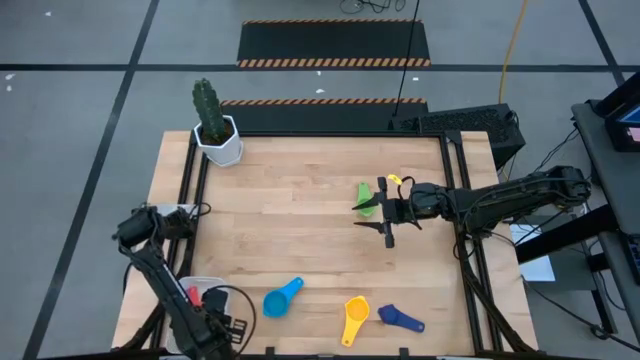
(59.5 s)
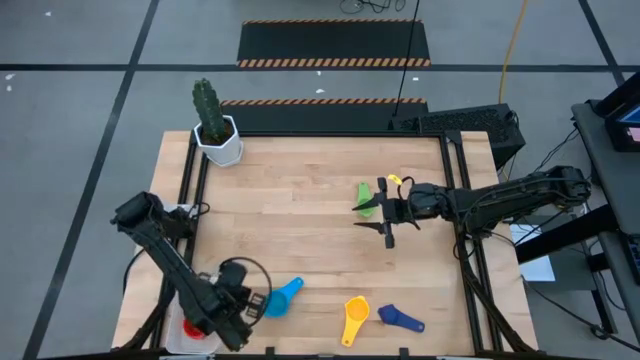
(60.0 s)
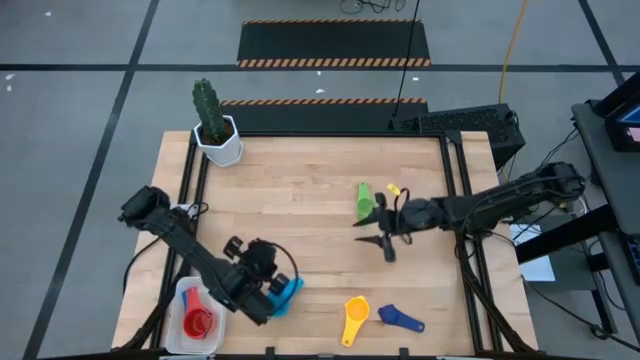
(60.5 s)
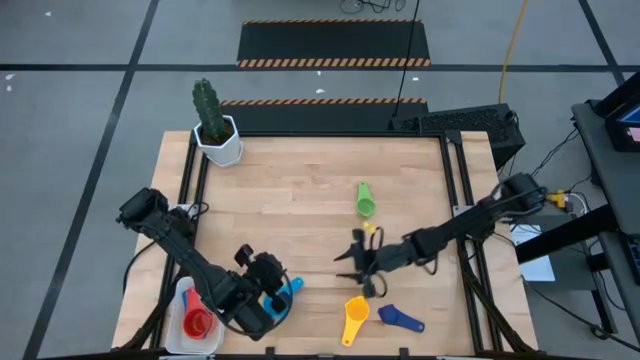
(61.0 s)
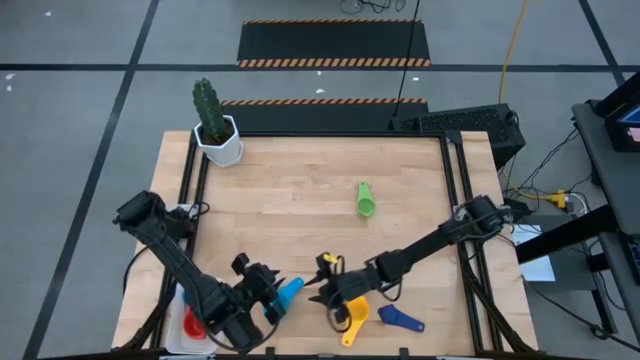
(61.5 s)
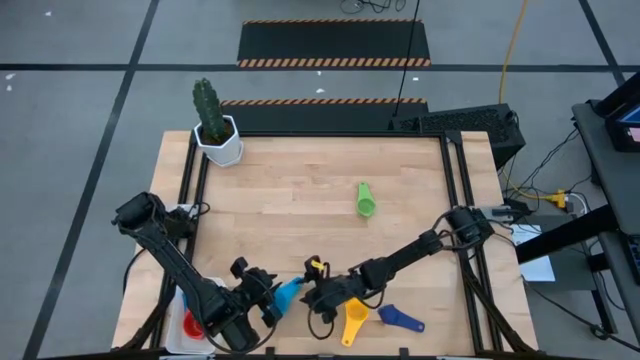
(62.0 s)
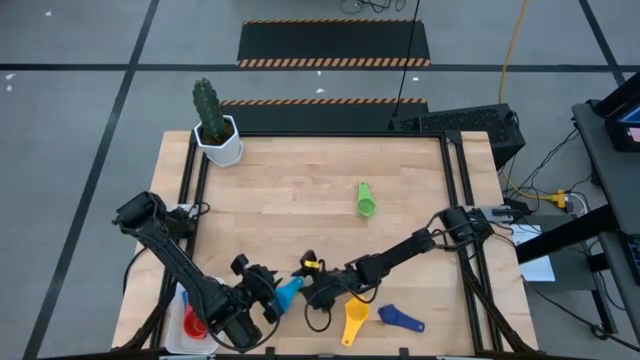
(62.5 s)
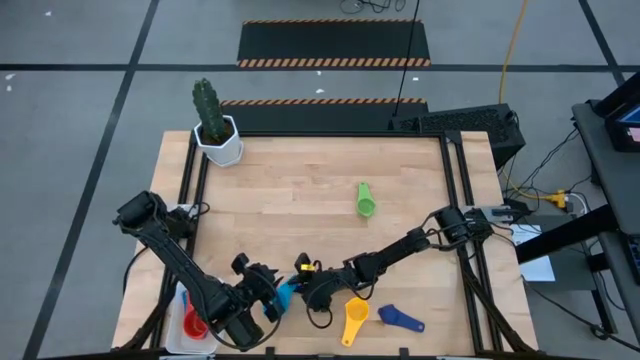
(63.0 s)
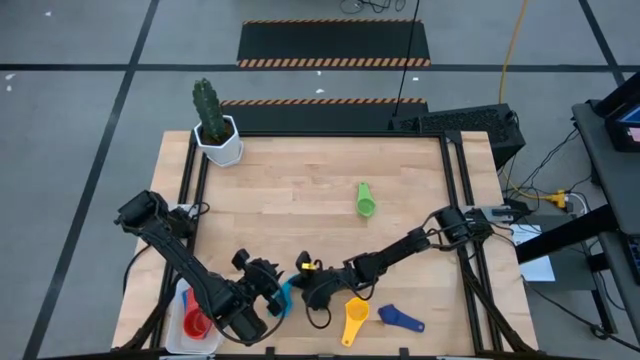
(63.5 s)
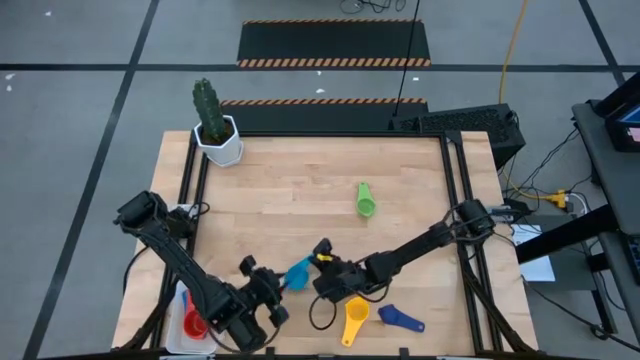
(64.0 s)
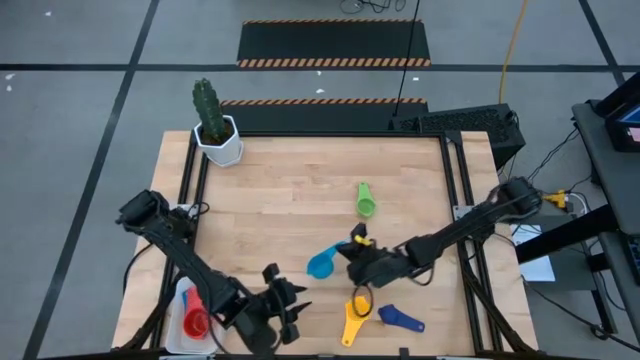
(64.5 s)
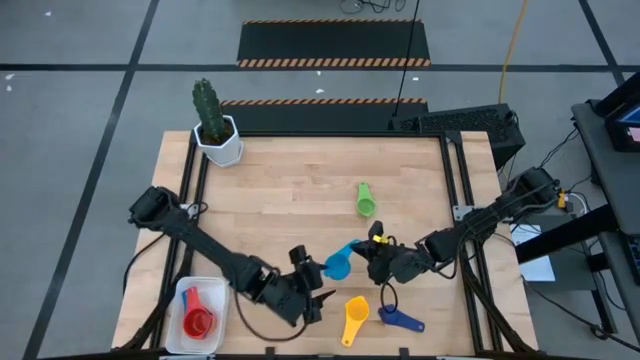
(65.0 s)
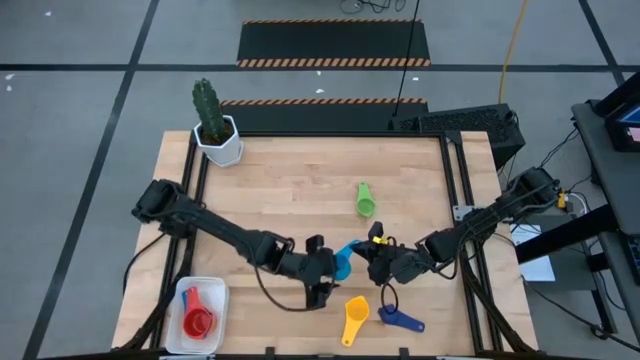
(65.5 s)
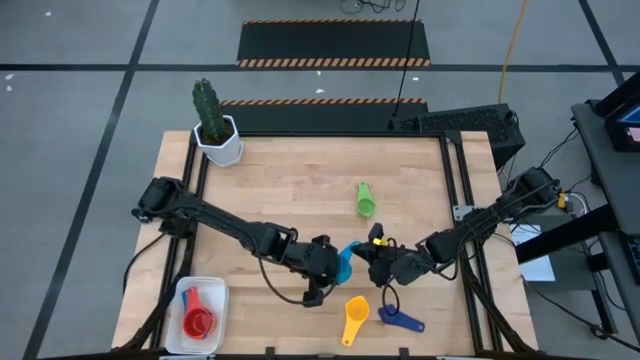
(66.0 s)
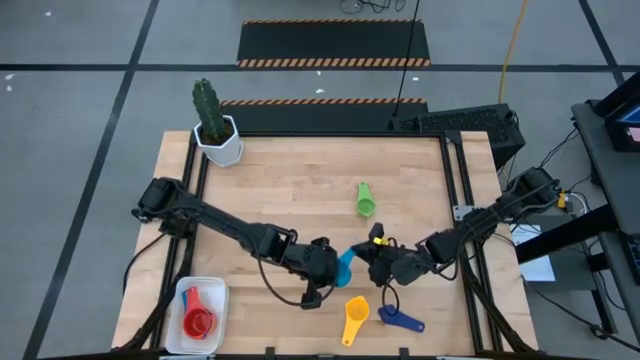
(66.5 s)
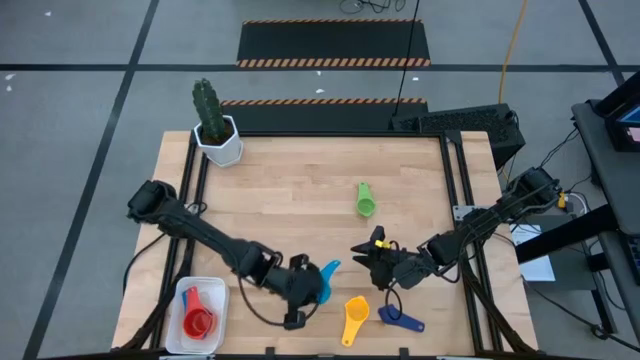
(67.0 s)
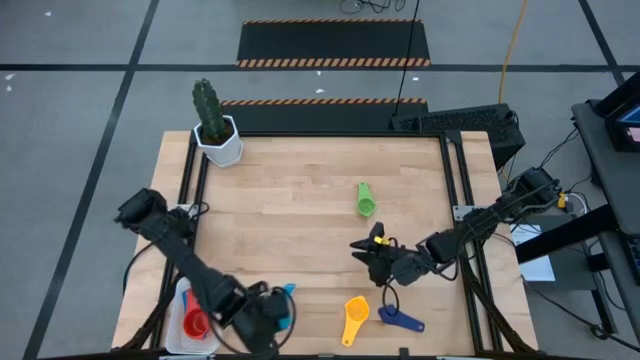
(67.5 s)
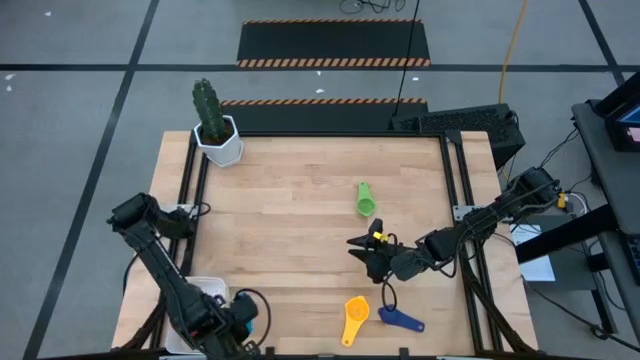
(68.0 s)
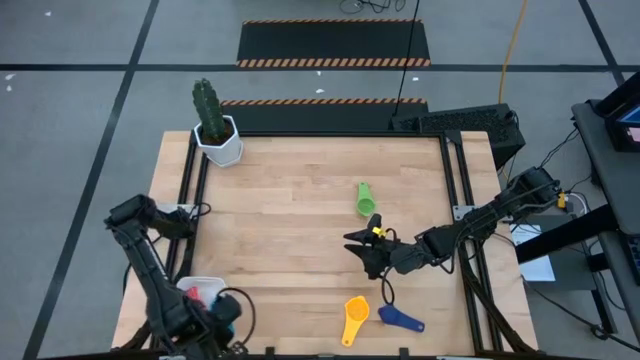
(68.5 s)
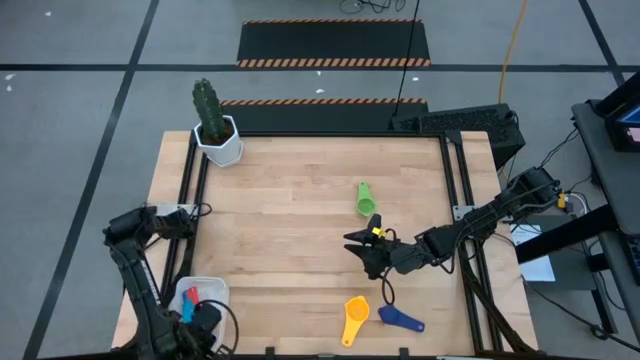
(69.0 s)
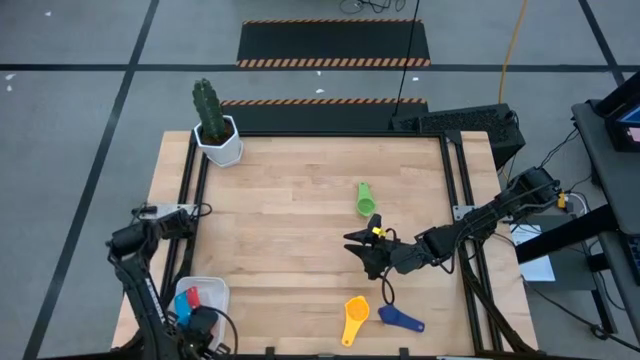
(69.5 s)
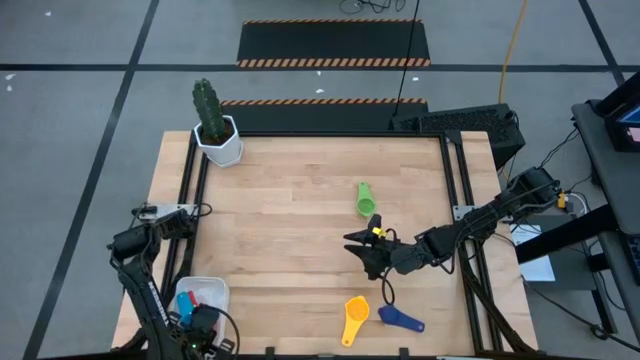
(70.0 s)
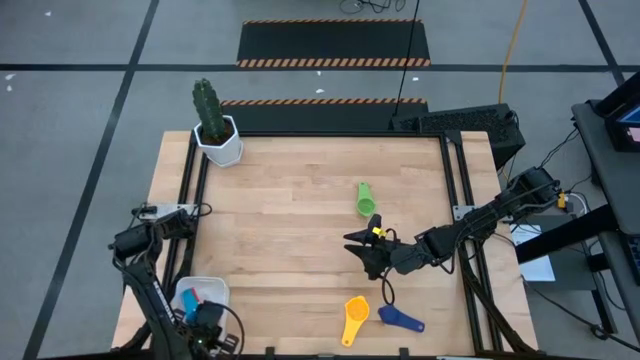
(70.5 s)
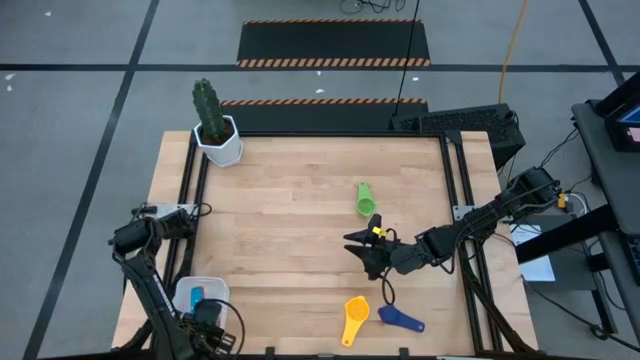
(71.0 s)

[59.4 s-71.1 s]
Task: Nest measuring cups in basket
Stack the light blue measuring cup on top of the red measuring cup into the white bin

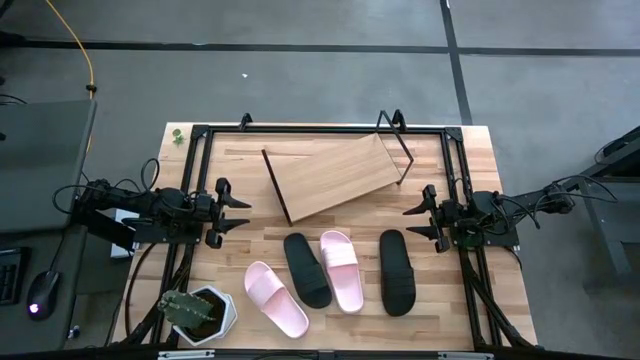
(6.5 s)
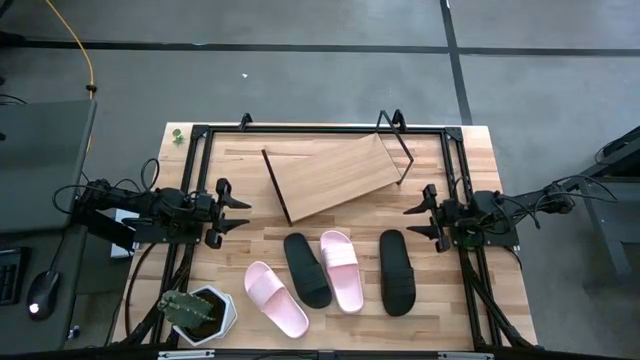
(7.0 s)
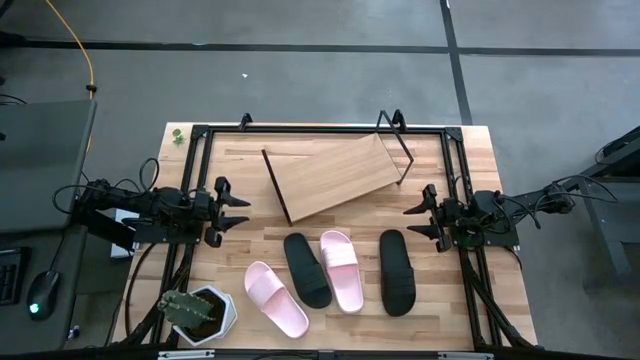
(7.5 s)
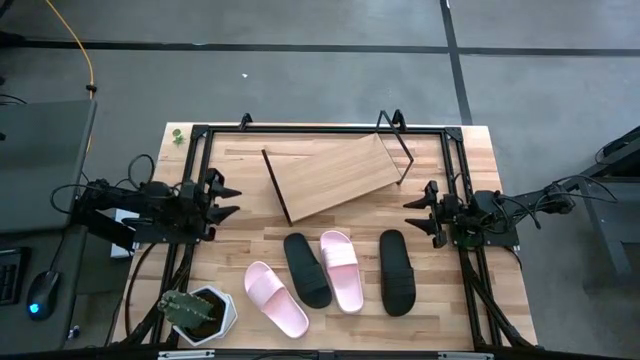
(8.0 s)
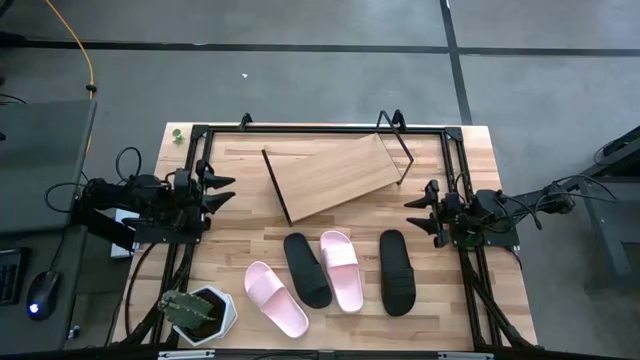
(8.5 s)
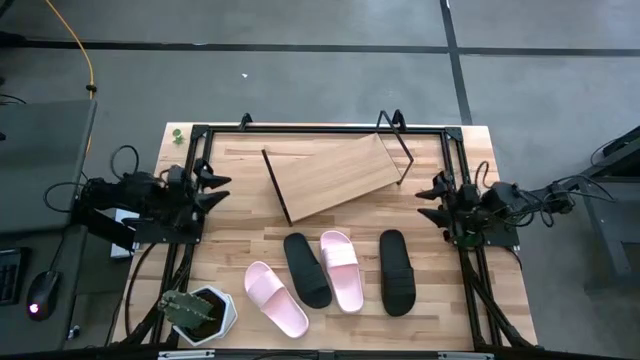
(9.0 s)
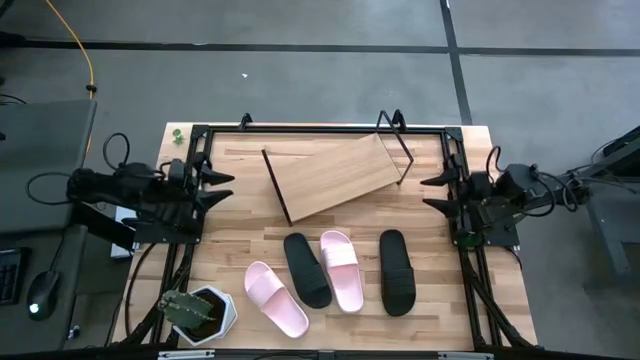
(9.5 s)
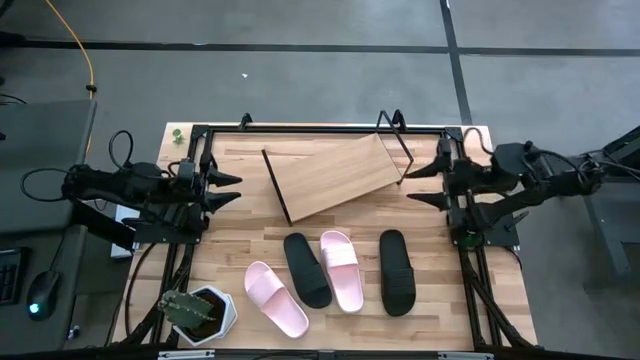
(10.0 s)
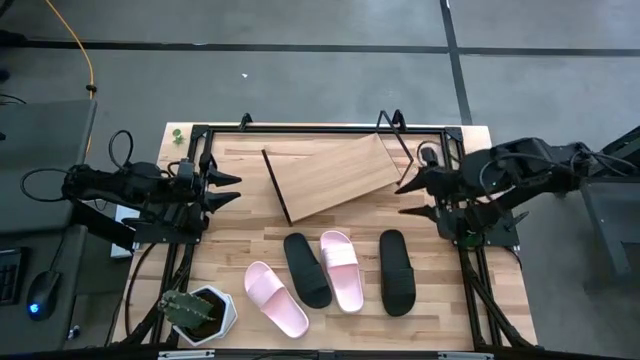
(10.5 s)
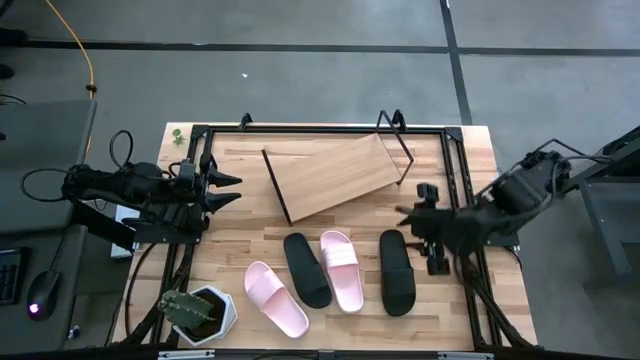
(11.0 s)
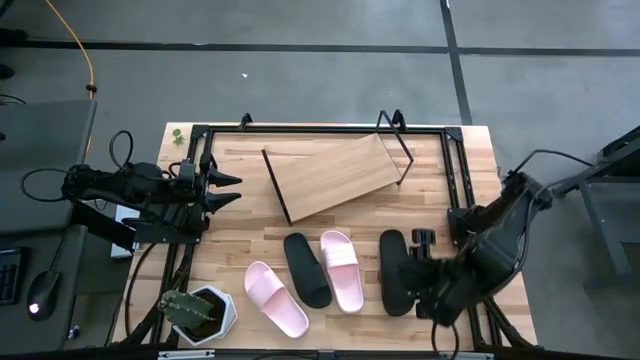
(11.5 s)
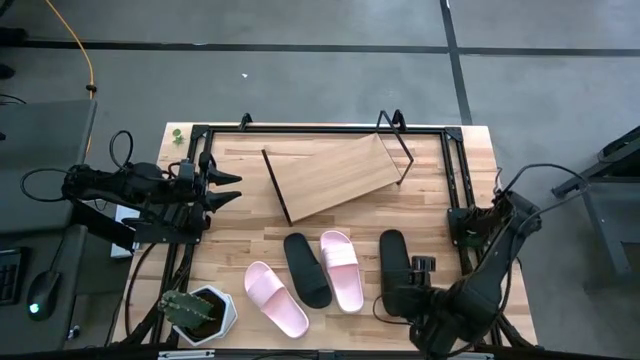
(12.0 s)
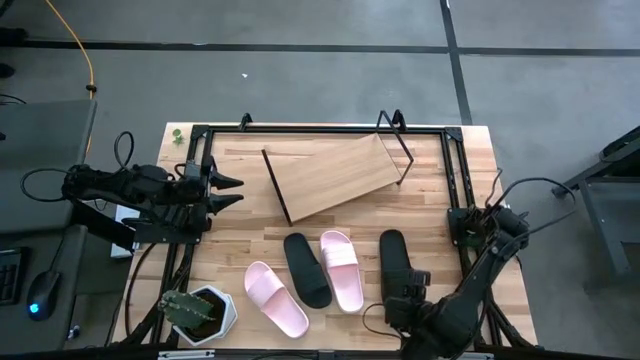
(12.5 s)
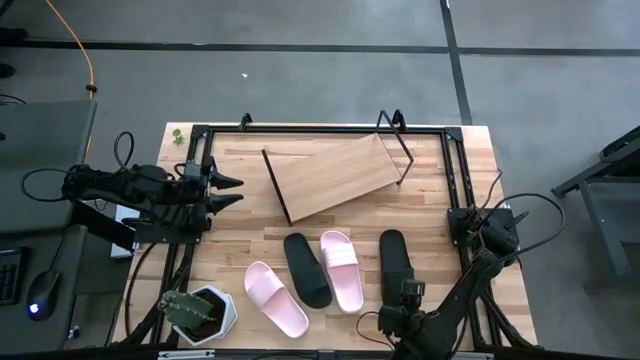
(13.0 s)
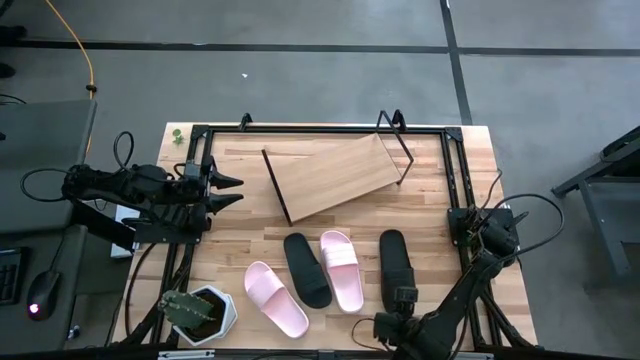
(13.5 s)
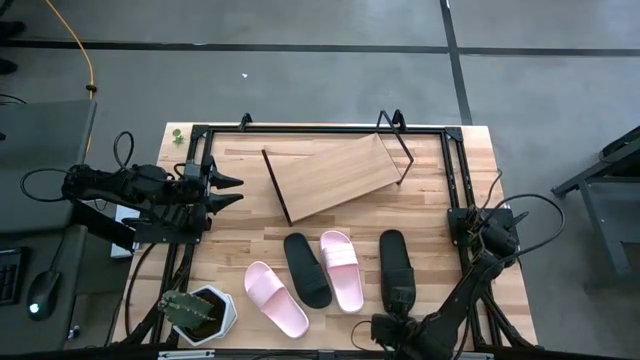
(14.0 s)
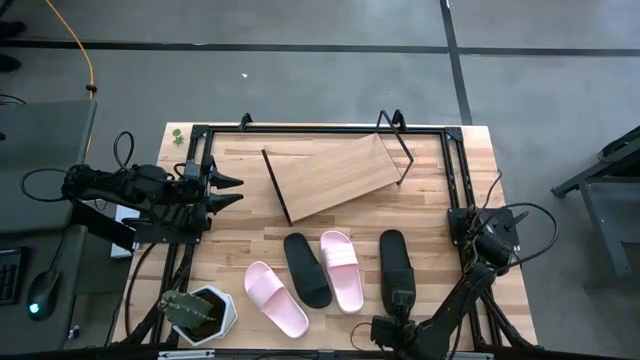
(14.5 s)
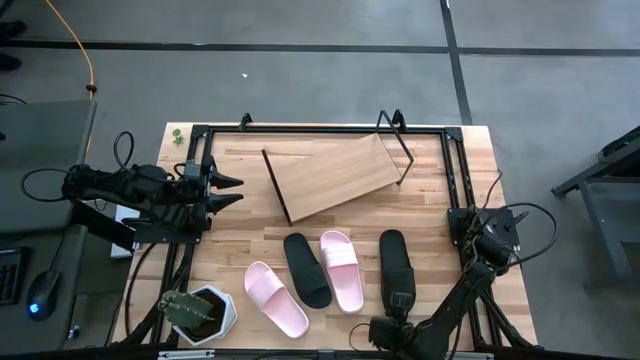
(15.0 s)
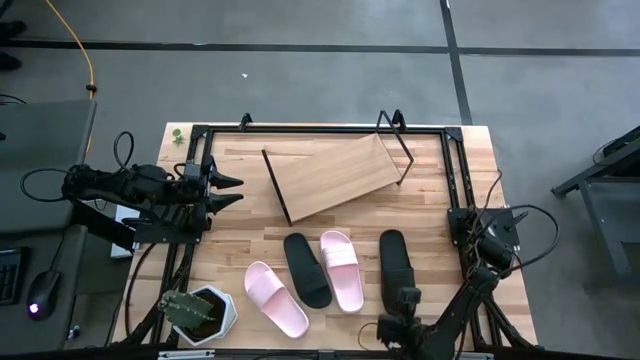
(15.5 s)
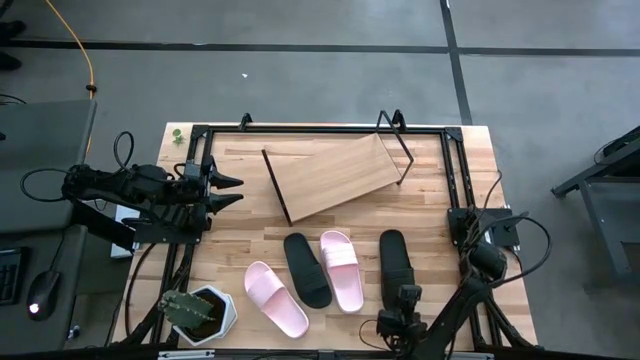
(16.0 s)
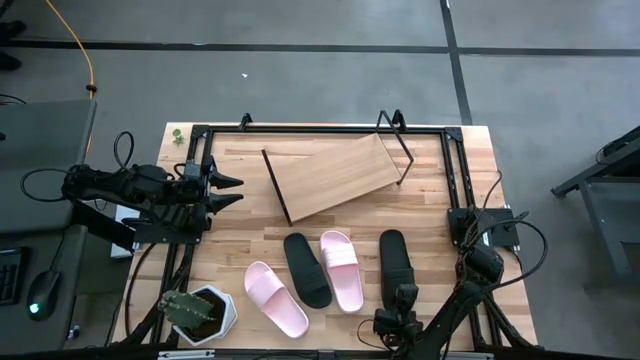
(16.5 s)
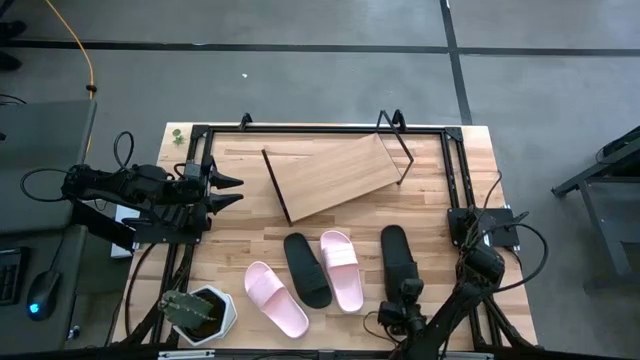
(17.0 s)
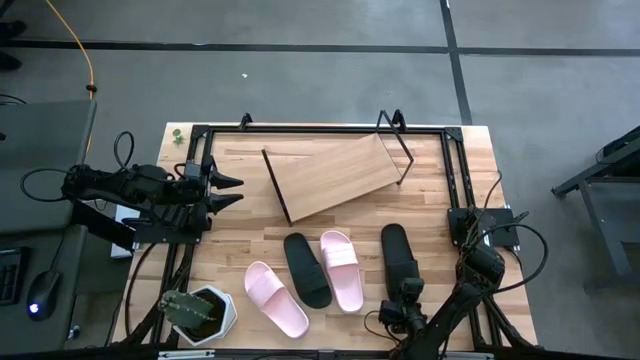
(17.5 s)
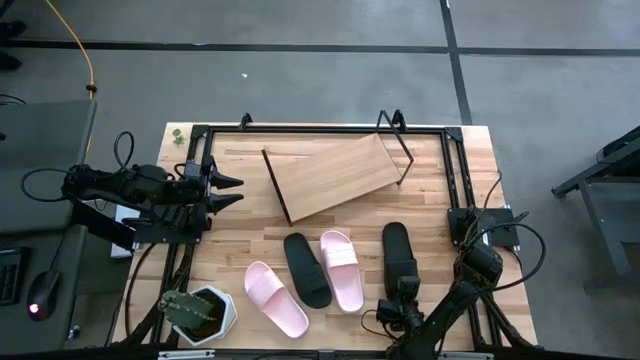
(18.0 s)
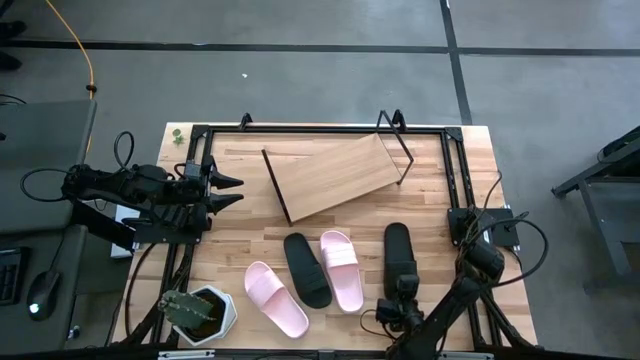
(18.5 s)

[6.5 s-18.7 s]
Task: Pick and place slides into the shelf
Put the right black slipper on the shelf
